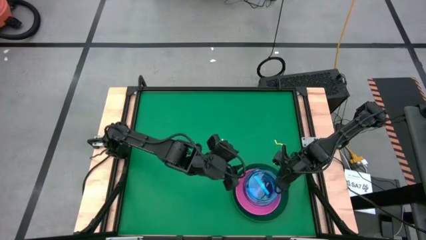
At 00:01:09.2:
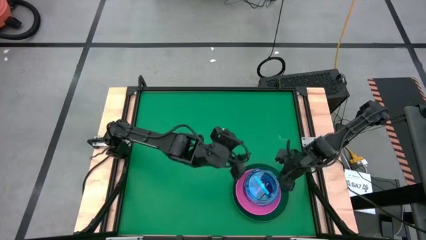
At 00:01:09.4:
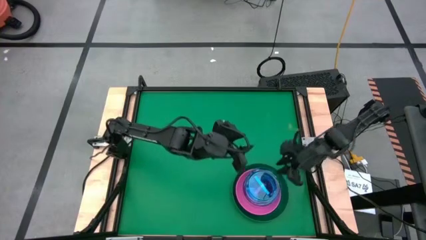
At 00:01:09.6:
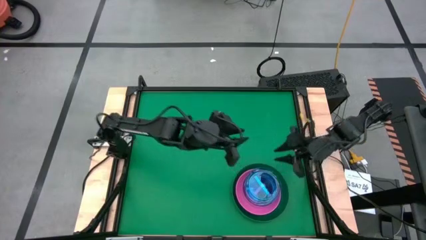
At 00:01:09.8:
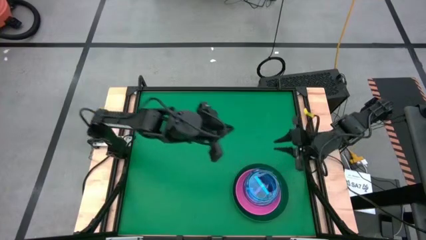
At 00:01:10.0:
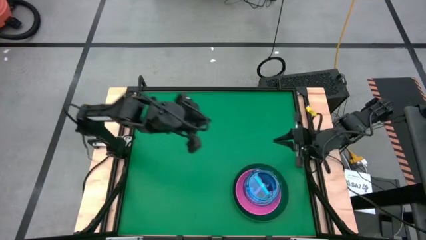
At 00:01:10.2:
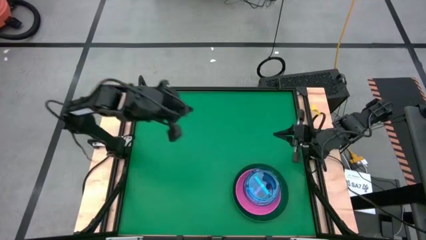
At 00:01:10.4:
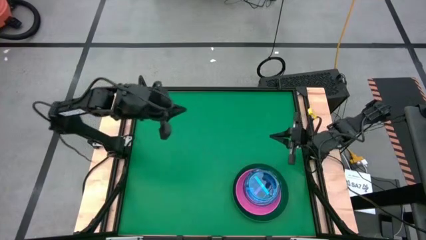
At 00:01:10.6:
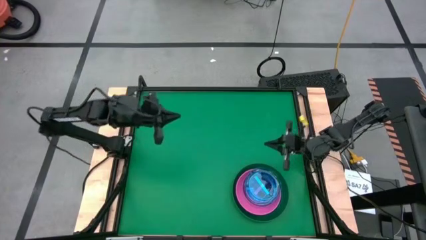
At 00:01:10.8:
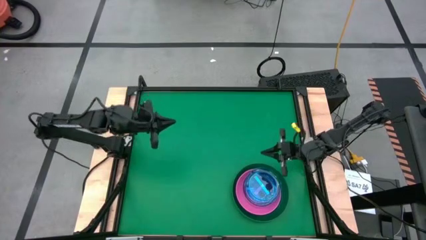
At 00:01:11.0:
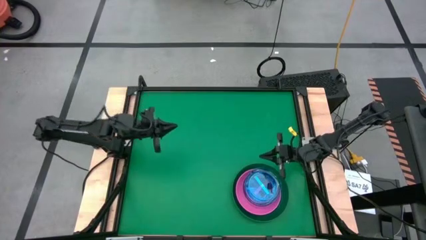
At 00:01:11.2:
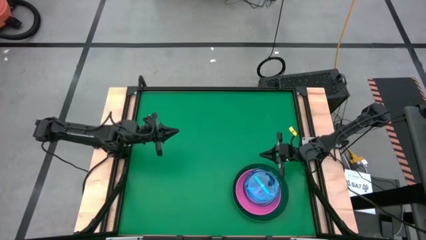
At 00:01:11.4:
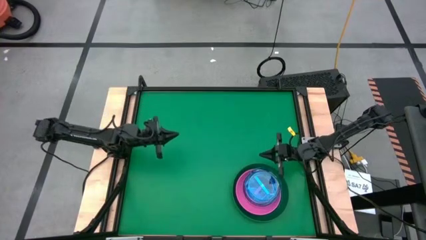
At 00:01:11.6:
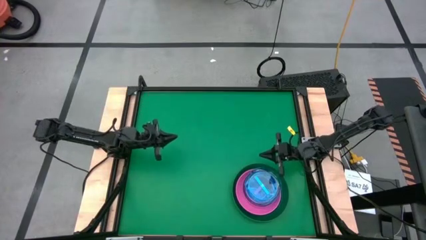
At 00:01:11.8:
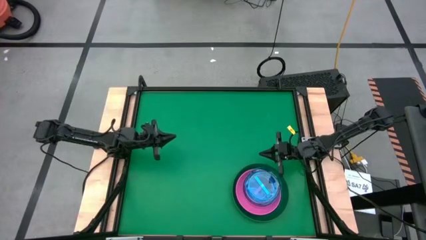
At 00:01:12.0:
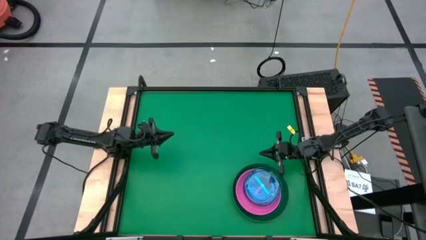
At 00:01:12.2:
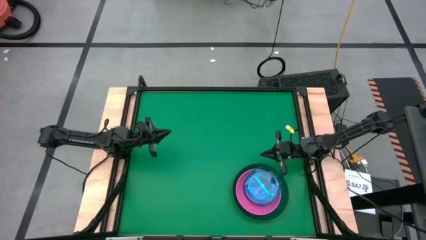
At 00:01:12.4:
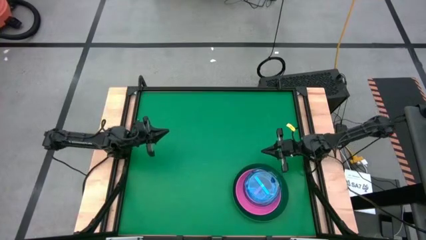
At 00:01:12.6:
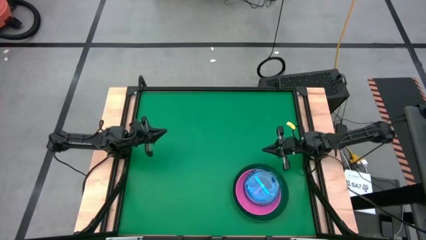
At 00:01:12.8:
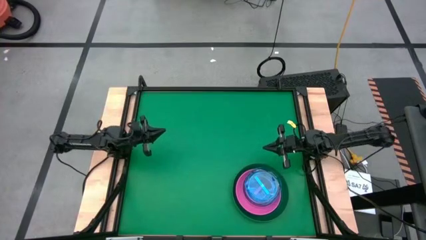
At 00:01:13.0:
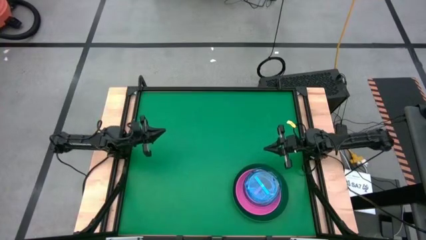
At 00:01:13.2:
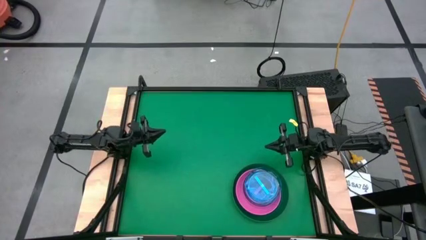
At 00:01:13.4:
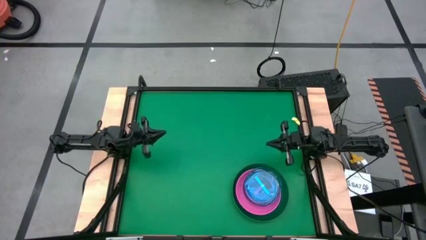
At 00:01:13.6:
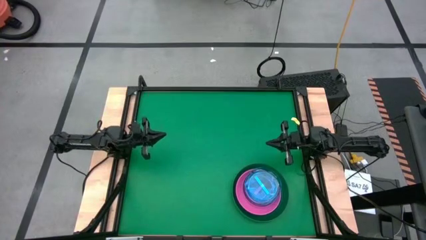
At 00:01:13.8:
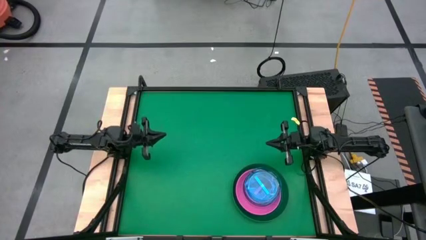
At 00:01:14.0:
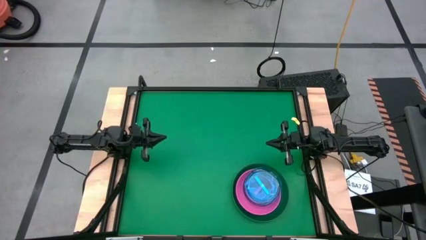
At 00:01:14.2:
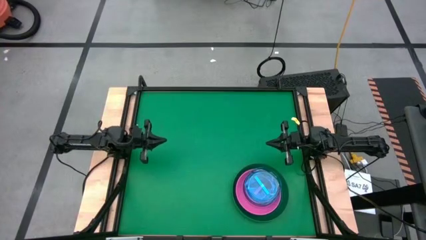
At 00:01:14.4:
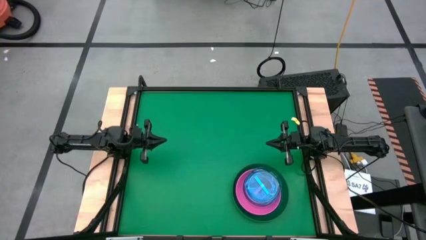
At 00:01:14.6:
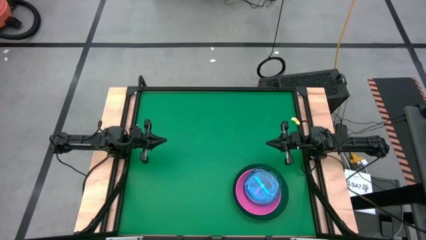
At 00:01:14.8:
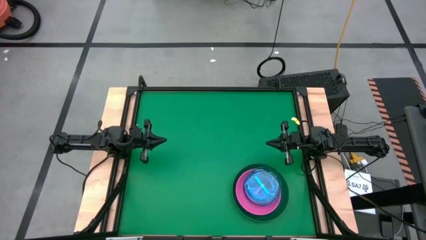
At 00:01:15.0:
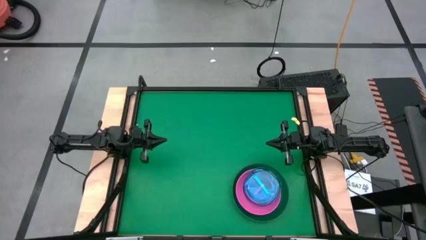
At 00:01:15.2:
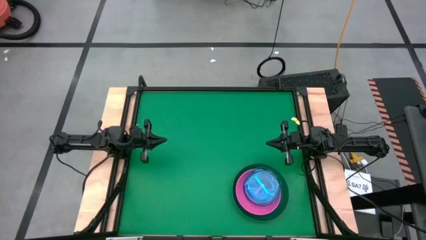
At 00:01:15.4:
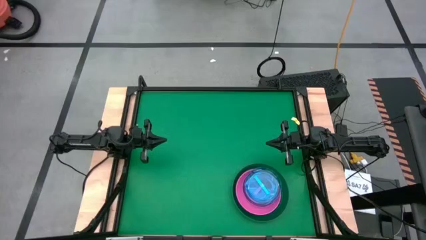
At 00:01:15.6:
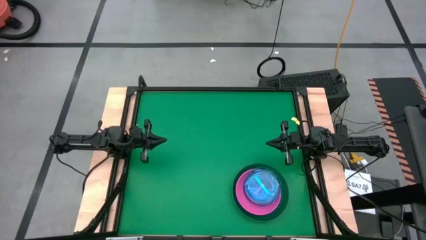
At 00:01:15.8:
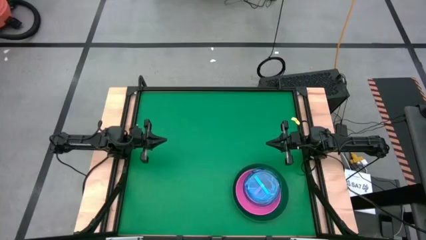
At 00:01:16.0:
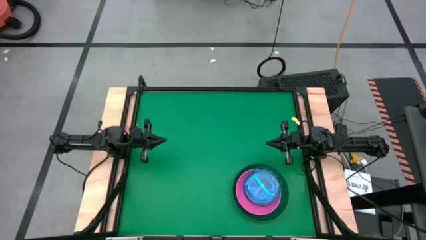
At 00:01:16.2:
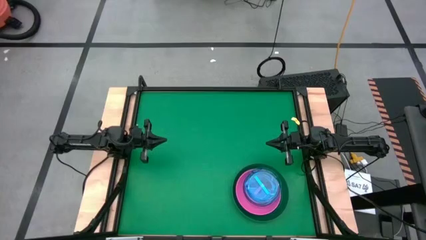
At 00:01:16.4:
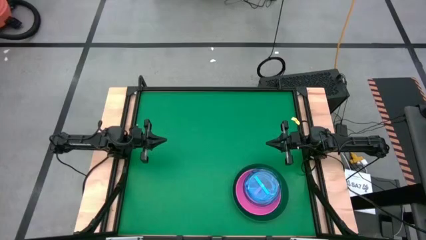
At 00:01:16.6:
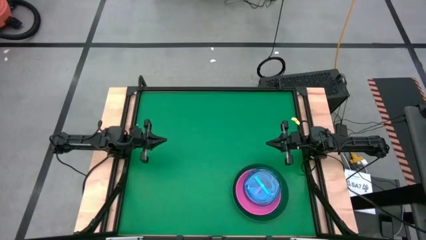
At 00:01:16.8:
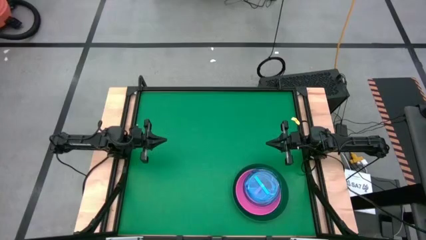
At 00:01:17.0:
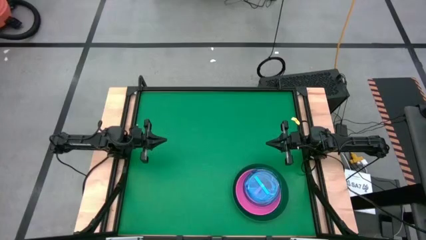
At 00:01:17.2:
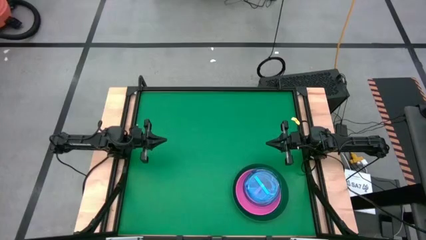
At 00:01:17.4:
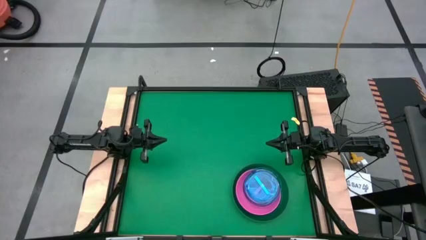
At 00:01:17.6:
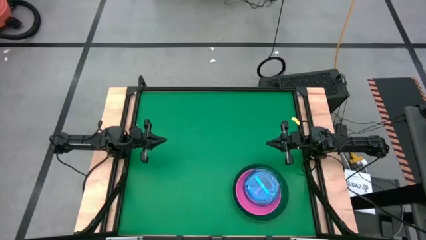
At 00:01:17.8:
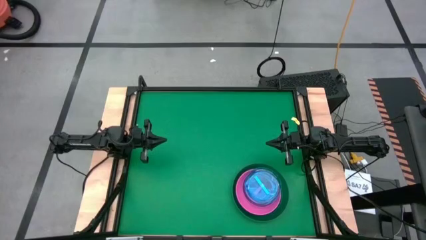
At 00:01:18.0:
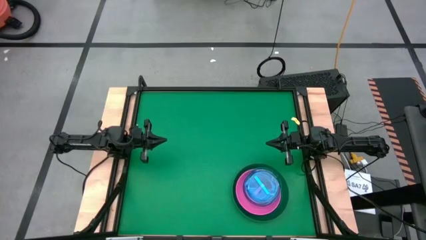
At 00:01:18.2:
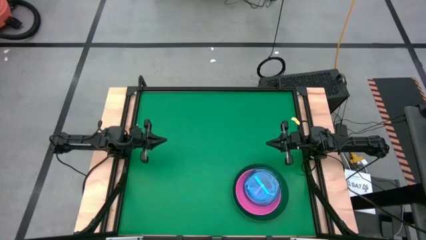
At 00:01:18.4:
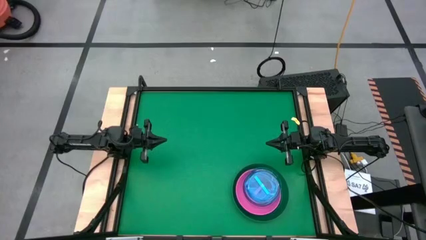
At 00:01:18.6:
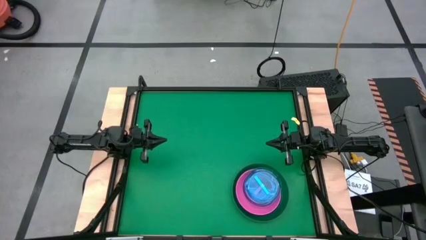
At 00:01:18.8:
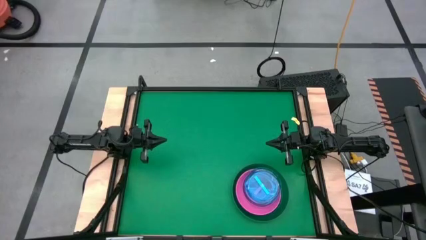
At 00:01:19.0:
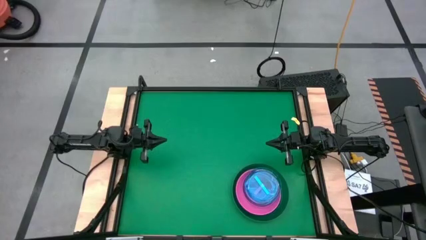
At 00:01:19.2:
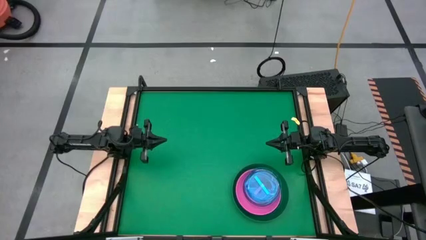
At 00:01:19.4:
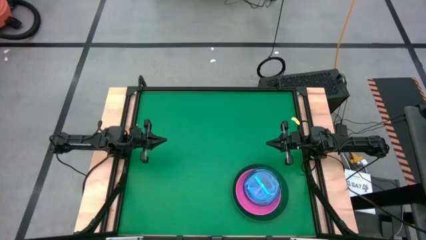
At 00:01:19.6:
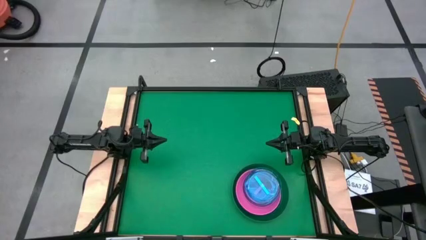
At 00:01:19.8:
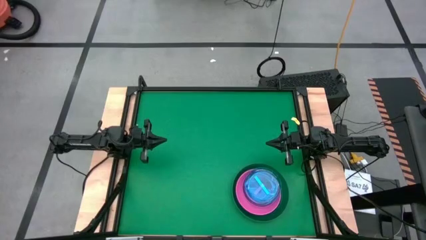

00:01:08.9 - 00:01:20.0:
Task: Stack plastic plates
Return to Home Position

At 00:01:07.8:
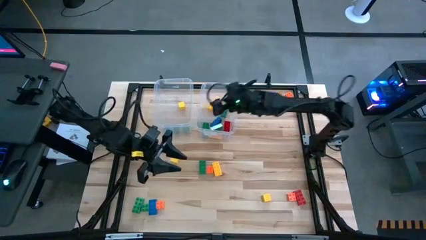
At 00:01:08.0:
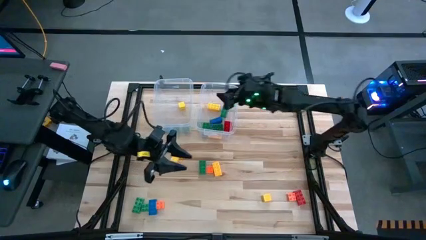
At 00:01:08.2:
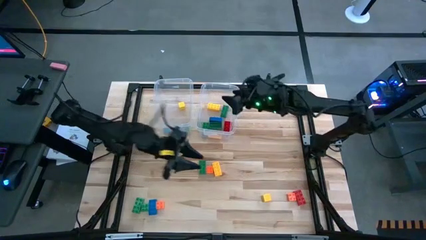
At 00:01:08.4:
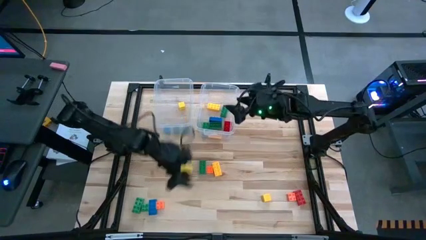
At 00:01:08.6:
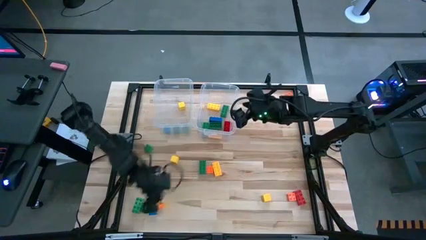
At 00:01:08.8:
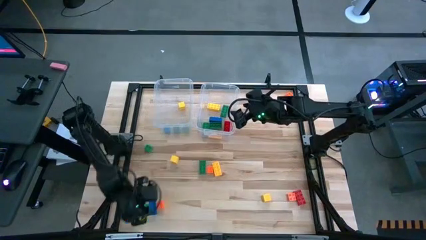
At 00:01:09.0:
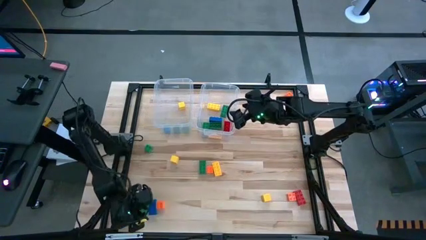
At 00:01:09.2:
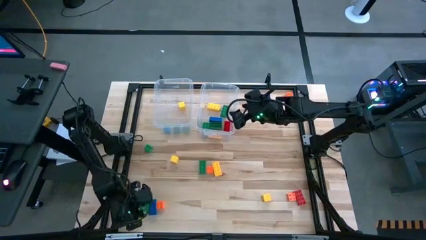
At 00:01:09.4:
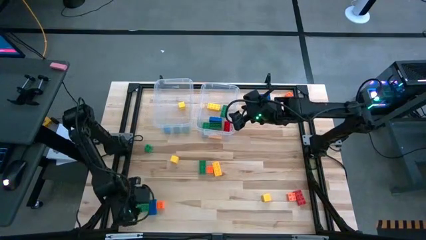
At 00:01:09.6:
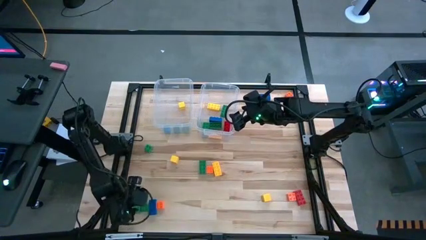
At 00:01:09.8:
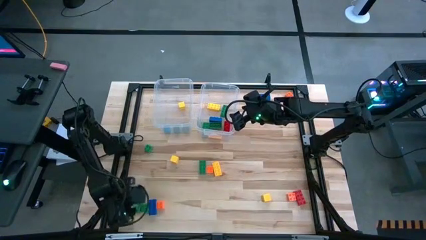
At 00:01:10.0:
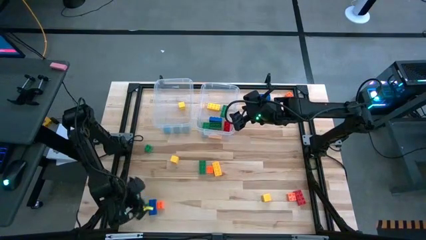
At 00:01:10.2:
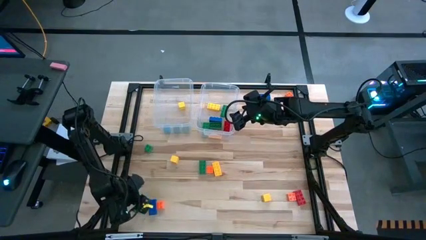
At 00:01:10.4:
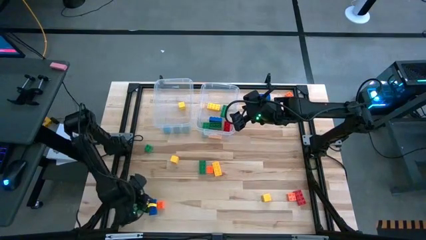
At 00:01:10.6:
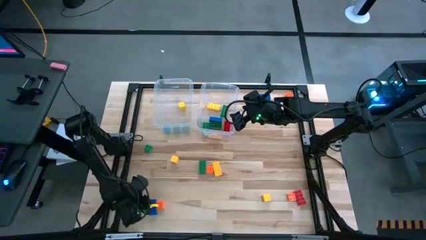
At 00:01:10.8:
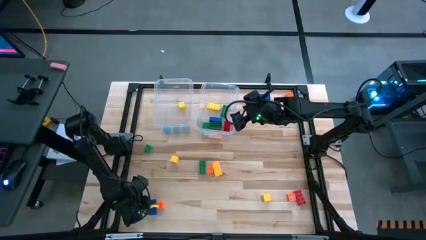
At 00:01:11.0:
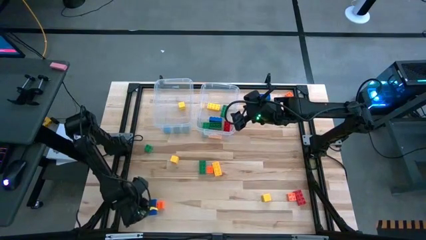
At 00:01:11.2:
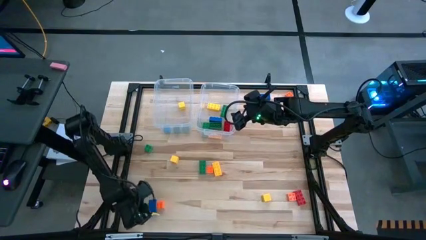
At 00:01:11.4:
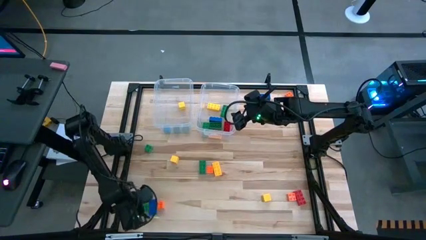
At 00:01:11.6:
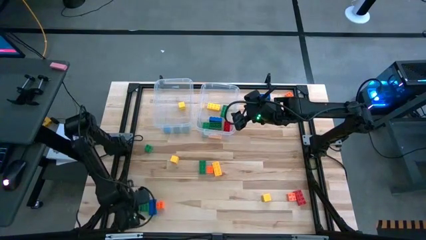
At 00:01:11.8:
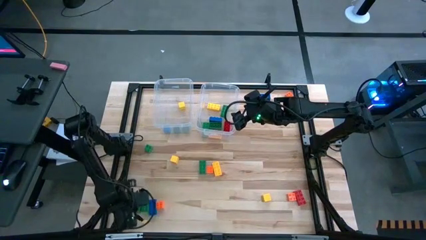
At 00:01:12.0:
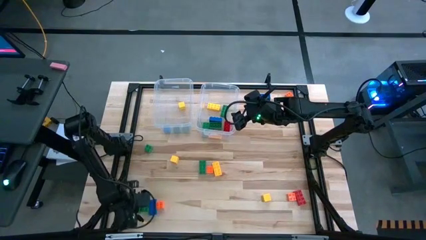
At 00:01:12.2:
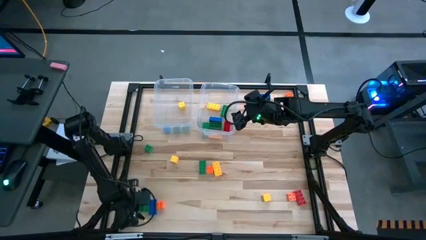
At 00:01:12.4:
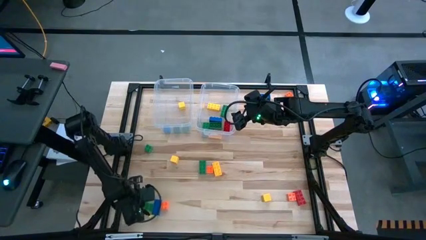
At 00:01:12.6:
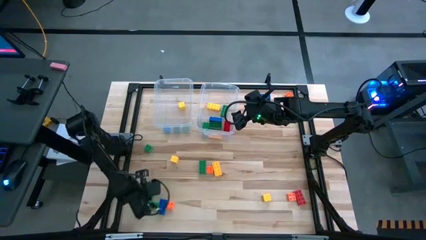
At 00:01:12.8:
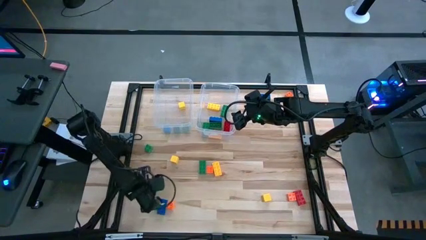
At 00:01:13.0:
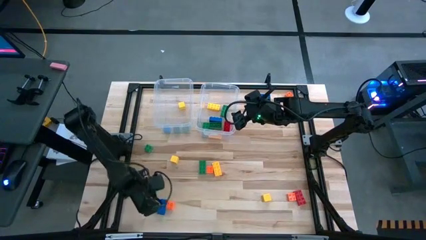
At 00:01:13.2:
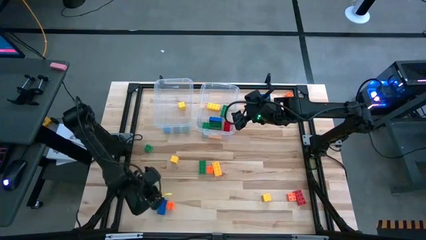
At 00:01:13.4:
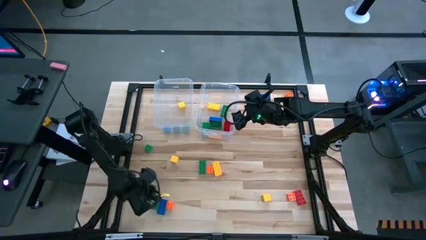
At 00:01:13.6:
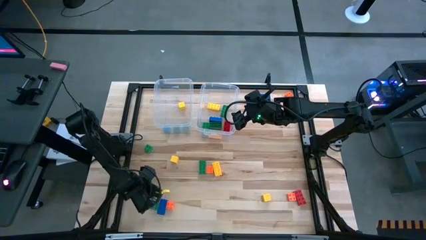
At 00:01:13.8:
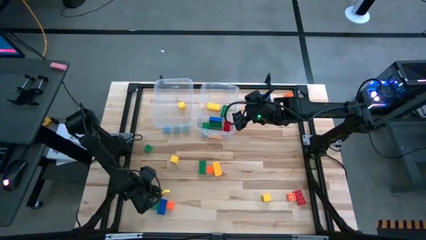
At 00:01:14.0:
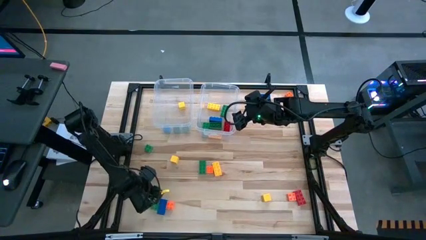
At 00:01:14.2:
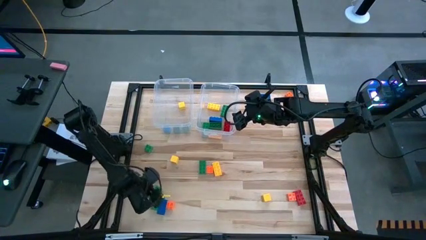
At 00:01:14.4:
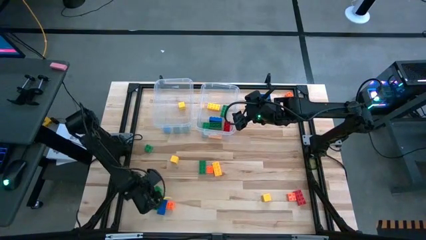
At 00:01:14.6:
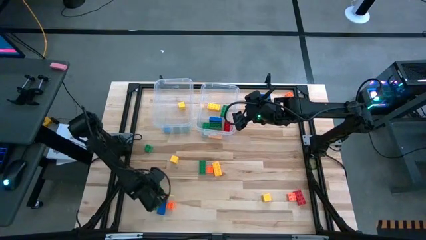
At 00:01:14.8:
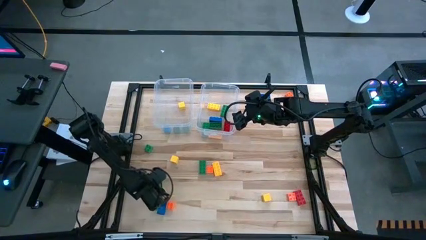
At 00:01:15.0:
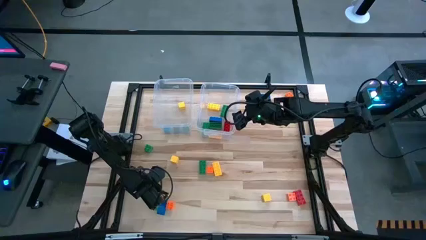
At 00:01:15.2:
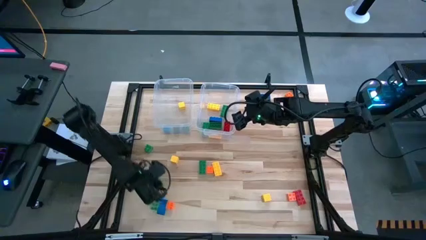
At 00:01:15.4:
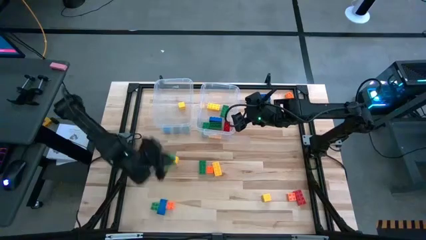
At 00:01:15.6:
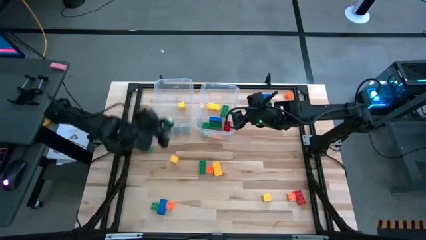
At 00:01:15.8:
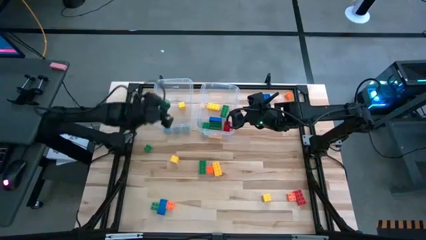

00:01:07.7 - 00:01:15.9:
Task: Sort blocks by size
Put the green big game piece into the right transparent bin
